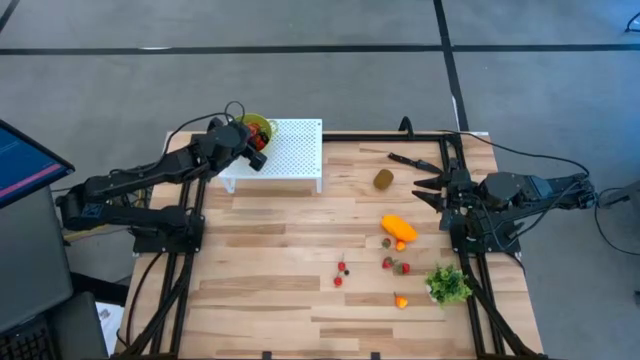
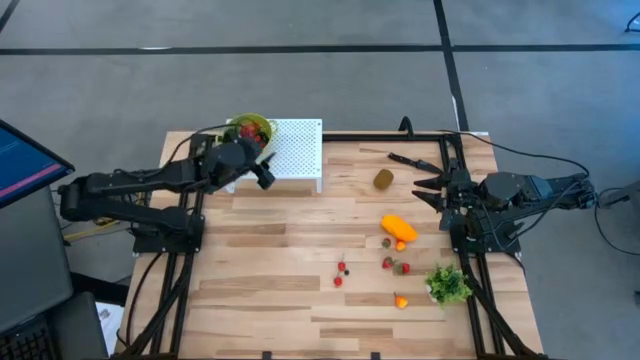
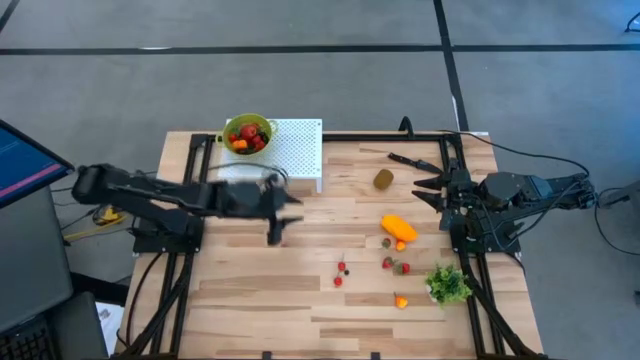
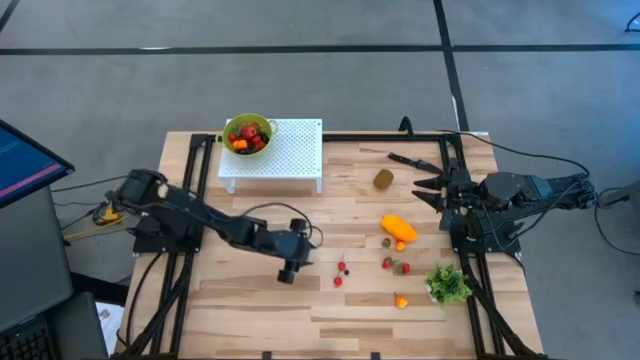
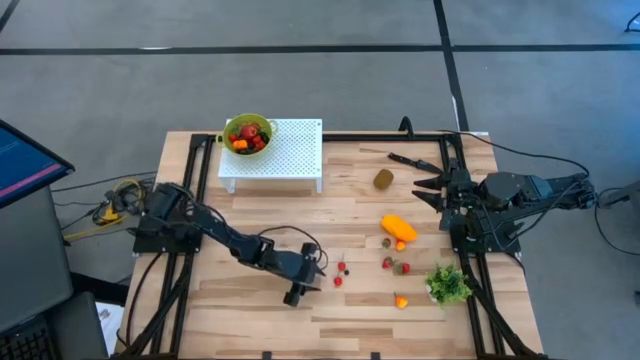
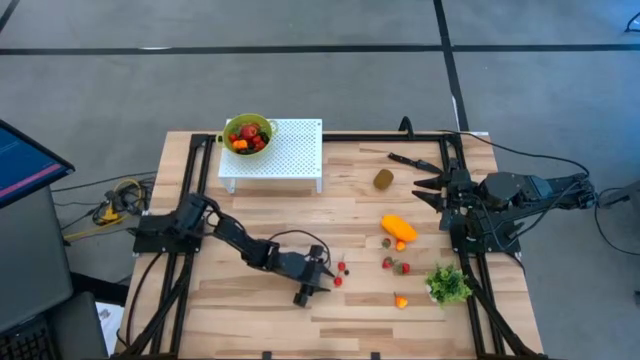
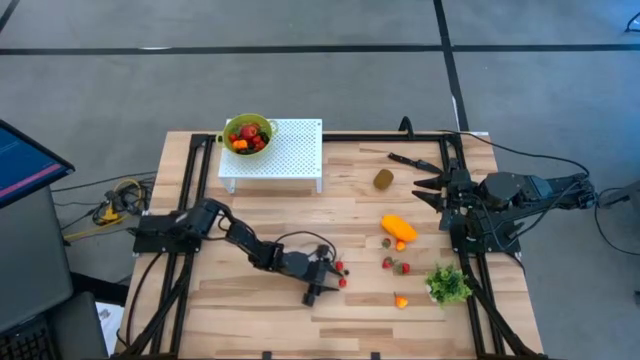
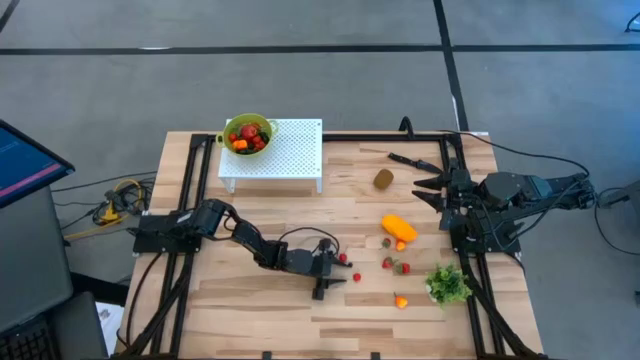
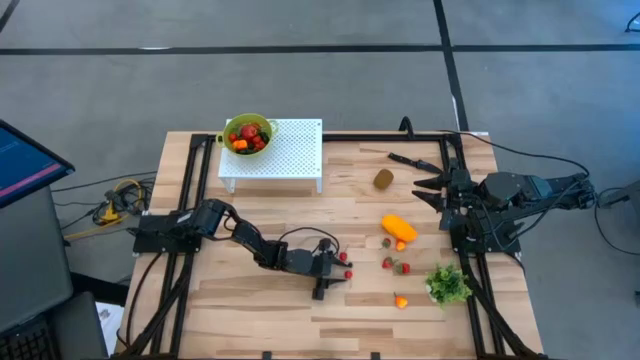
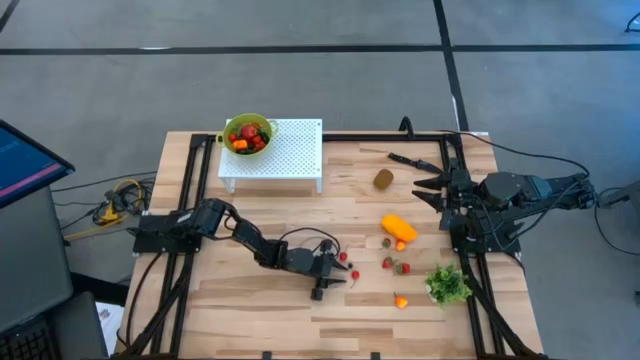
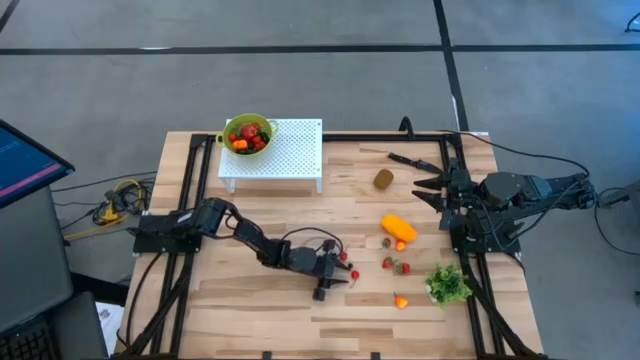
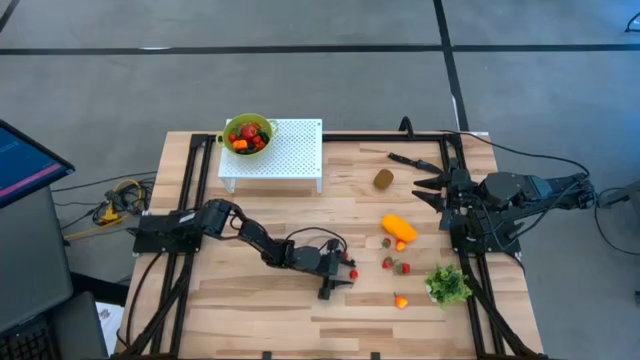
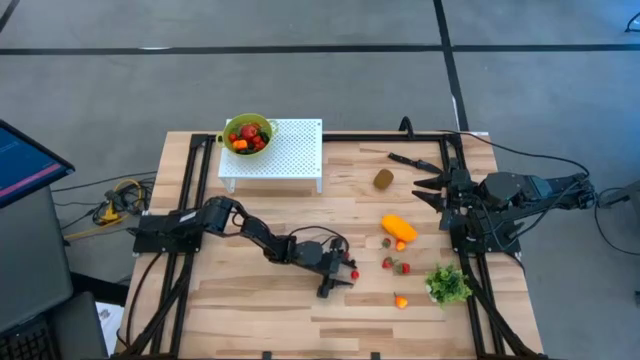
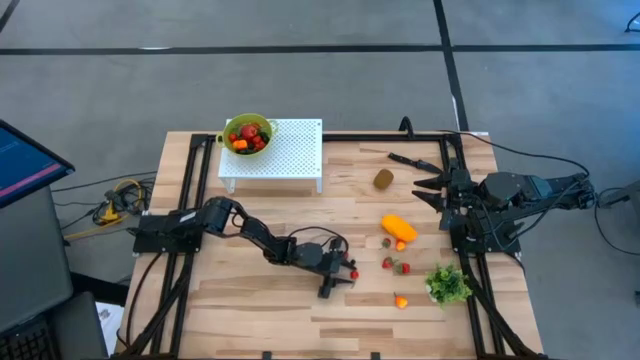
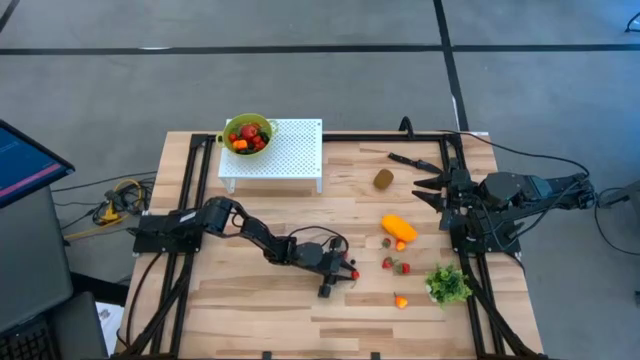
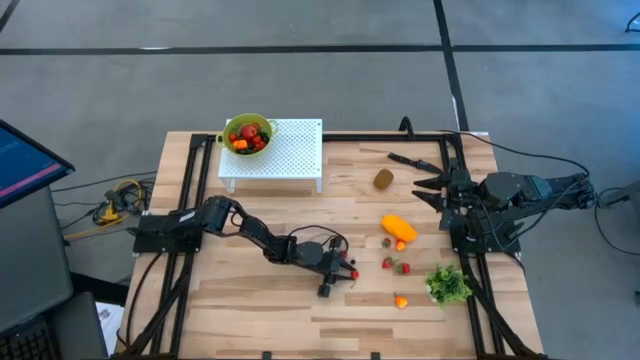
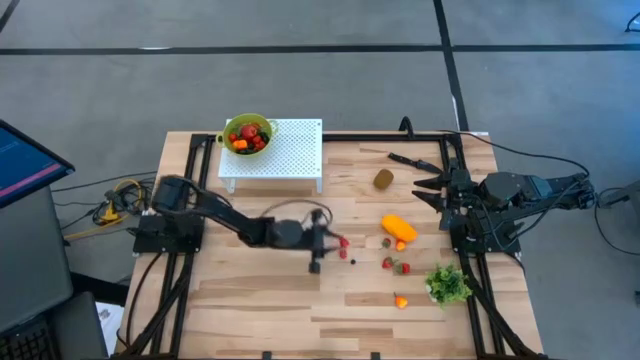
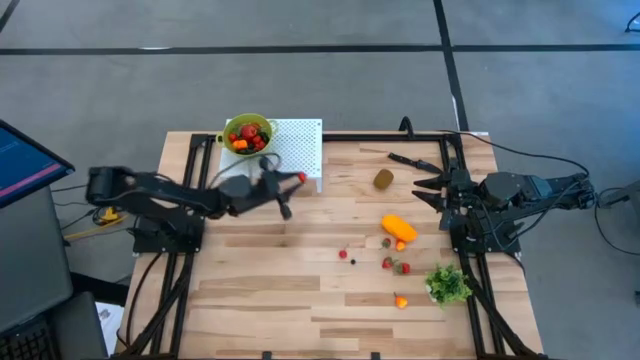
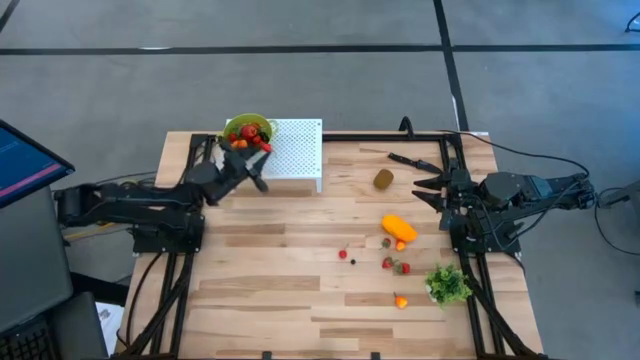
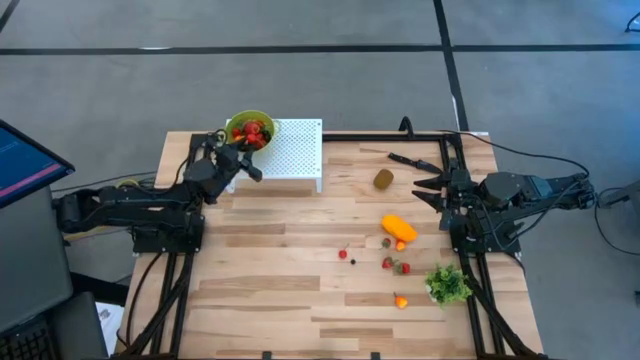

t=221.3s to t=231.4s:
Task: Pick & Place Fruit
Put the red cherry into the green strainer bowl on the shelf

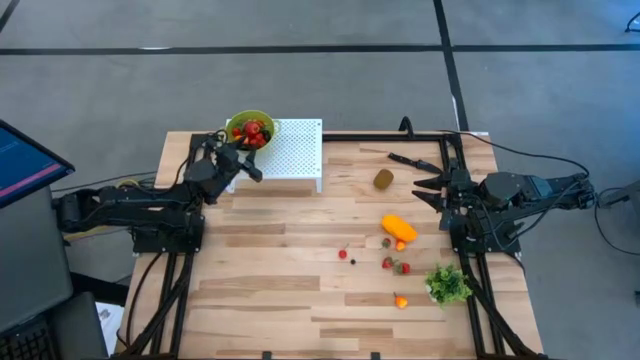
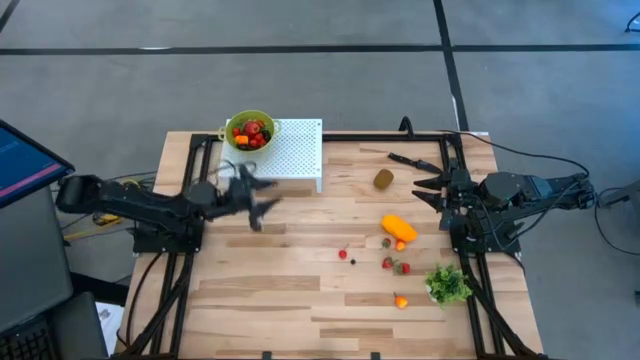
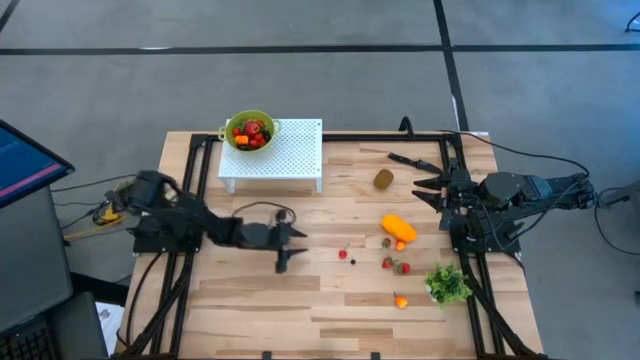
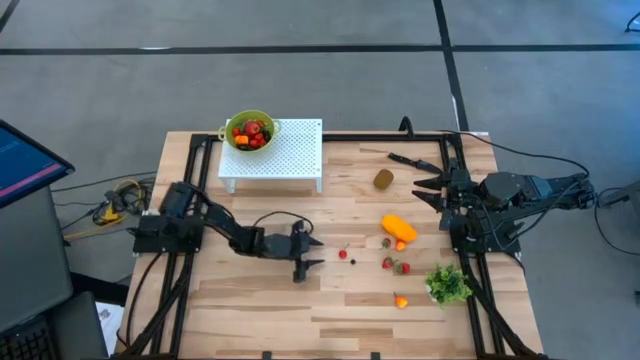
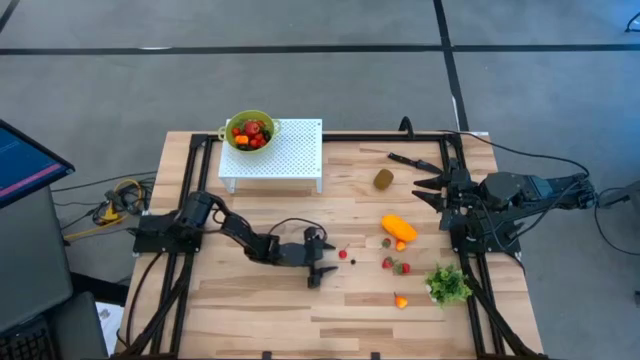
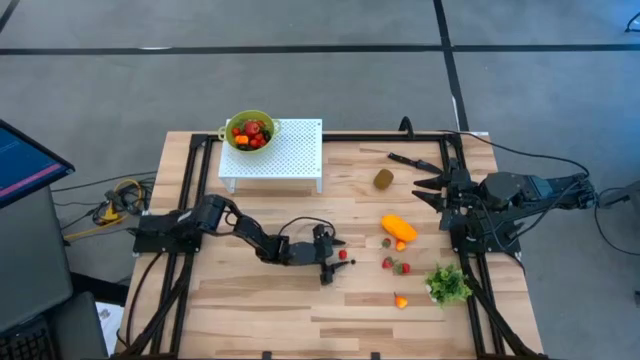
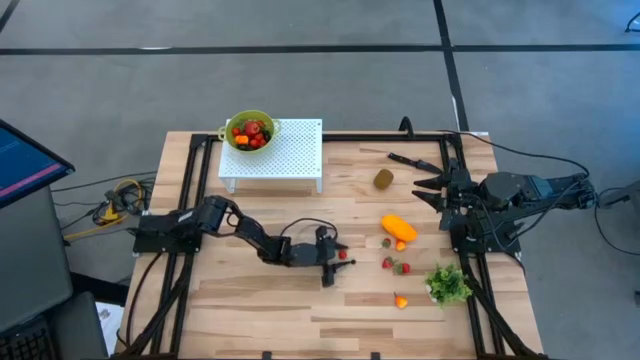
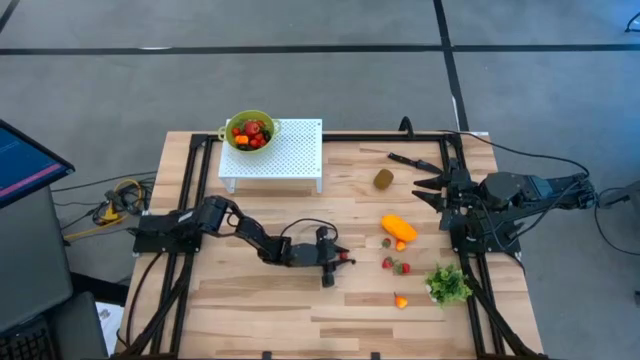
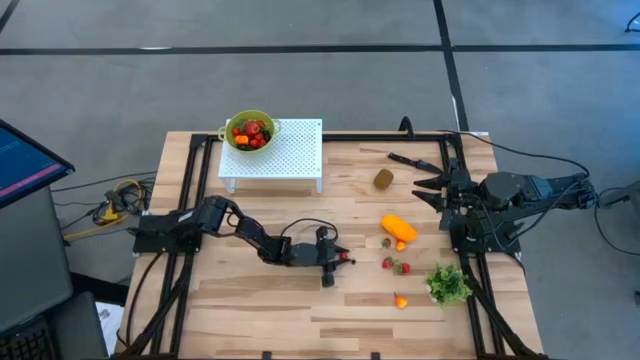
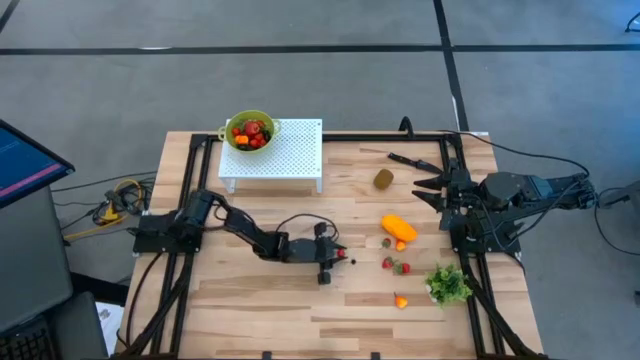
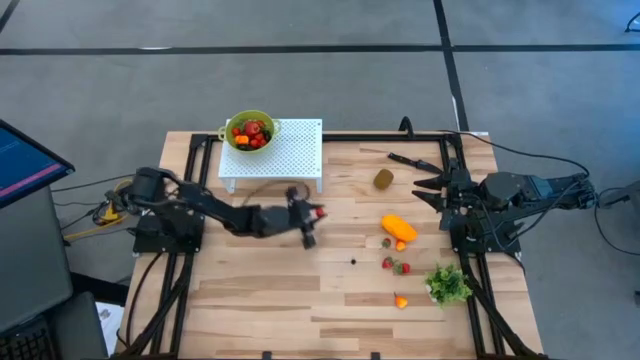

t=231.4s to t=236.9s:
Put the red cherry into the green strainer bowl on the shelf

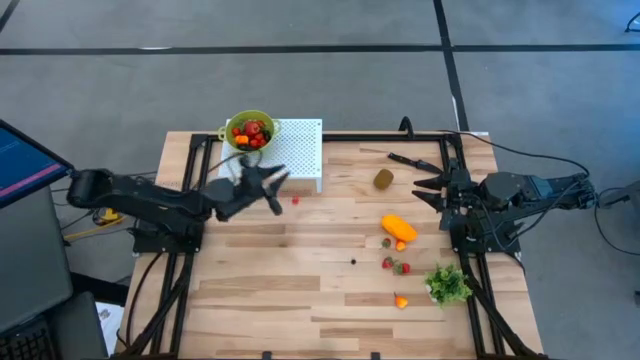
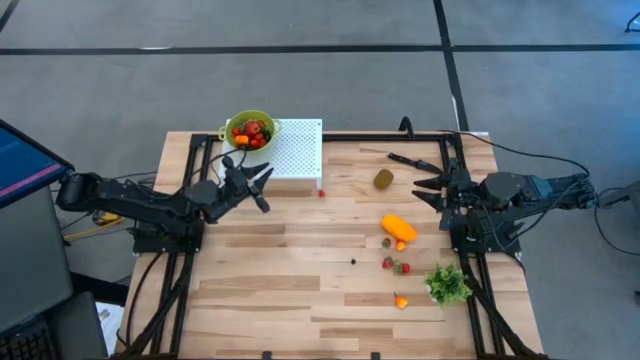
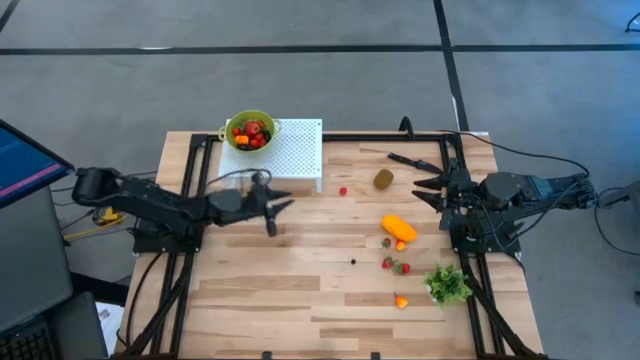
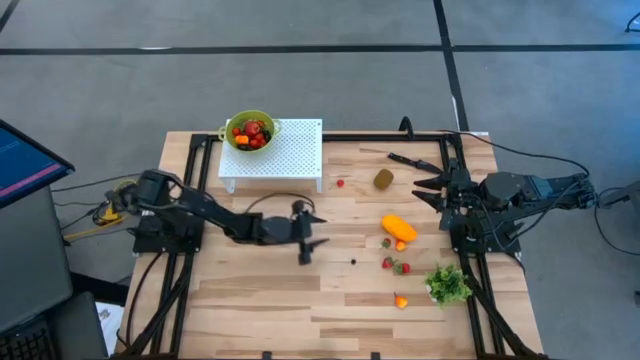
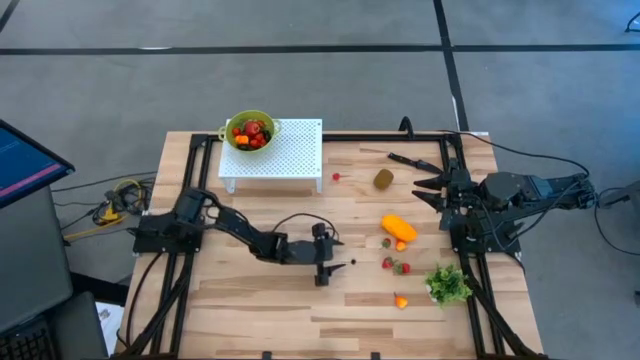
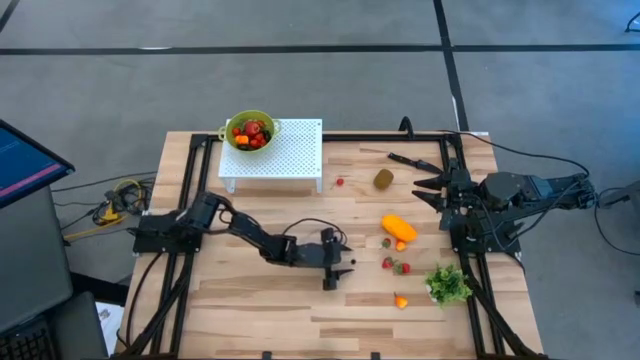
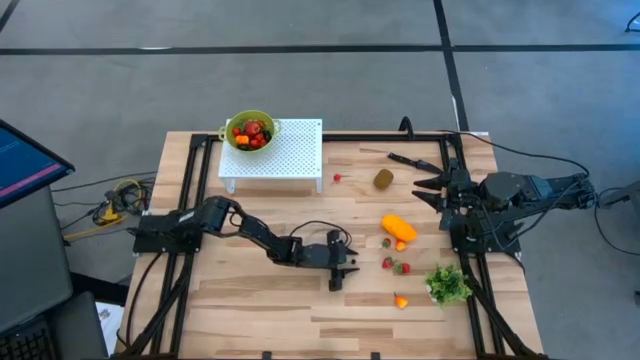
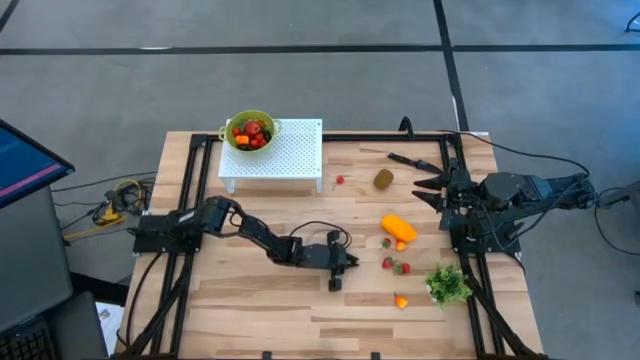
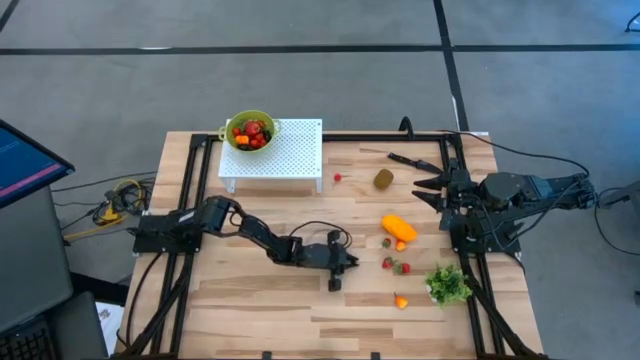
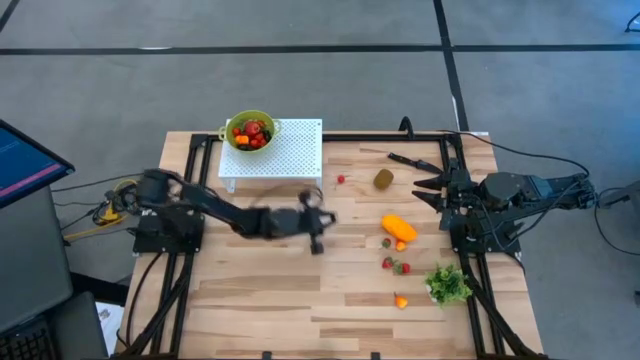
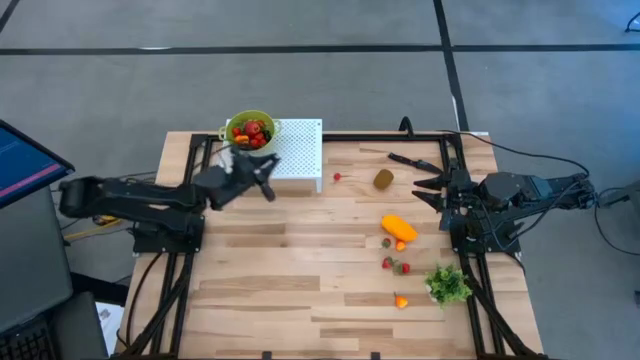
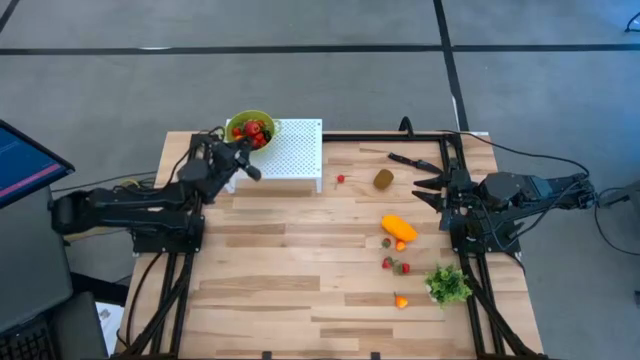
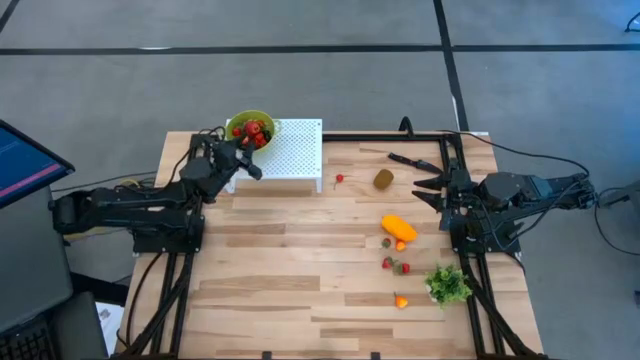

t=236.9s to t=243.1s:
Put the blueberry into the green strainer bowl on the shelf
